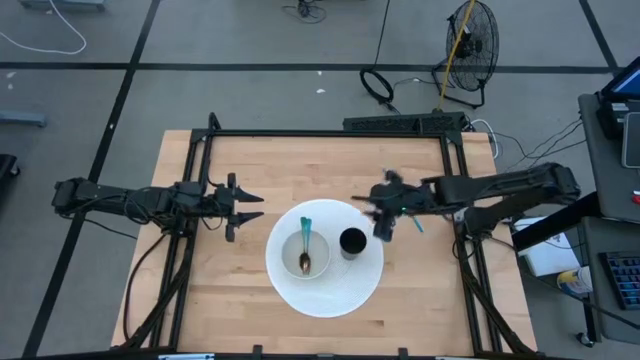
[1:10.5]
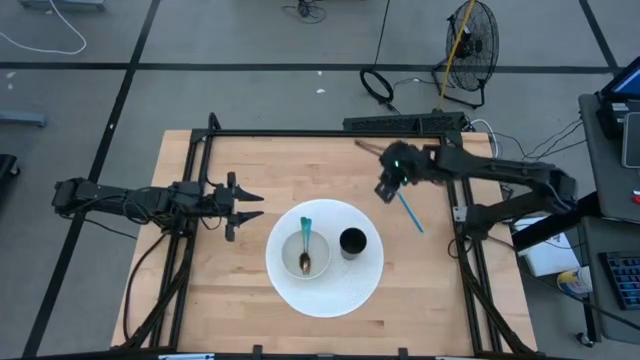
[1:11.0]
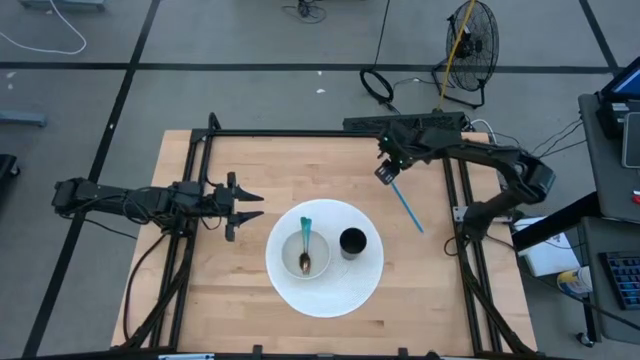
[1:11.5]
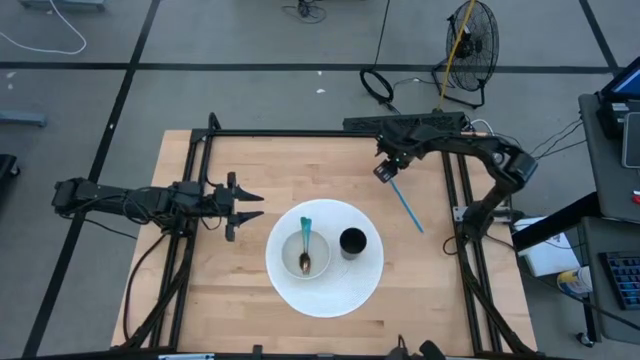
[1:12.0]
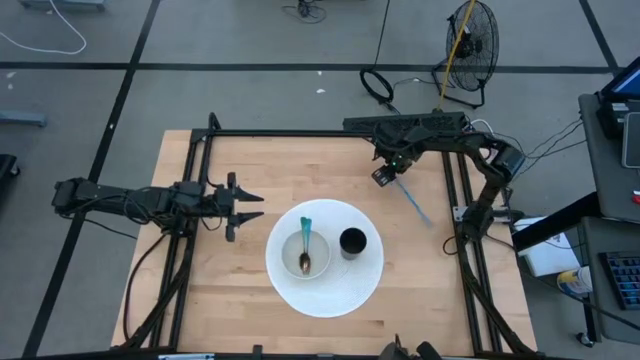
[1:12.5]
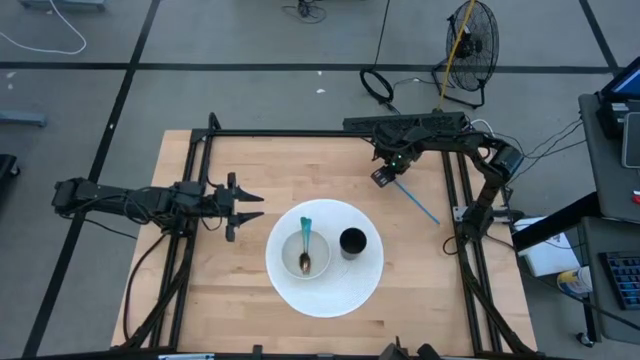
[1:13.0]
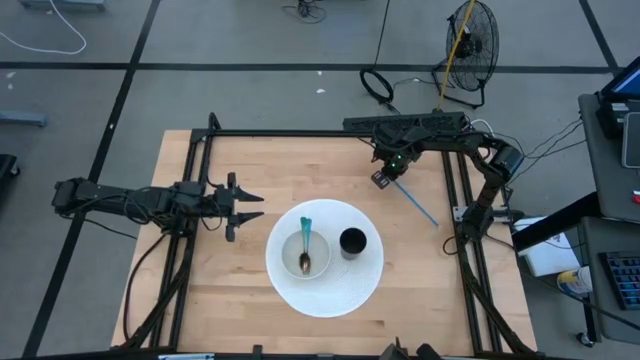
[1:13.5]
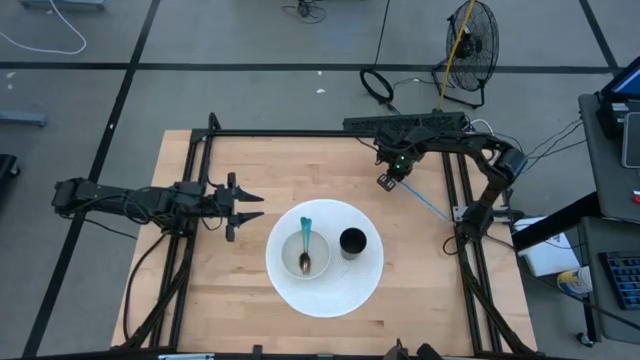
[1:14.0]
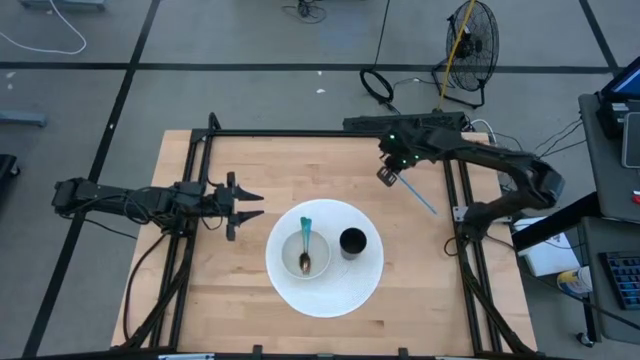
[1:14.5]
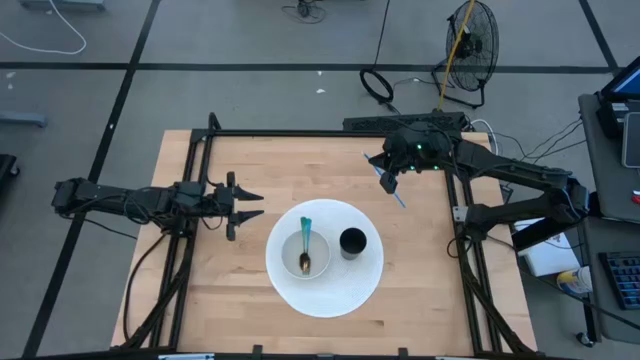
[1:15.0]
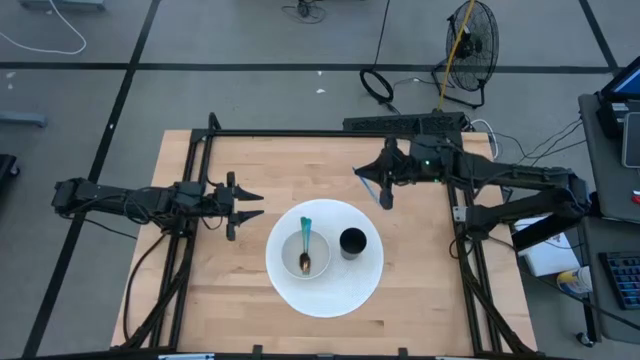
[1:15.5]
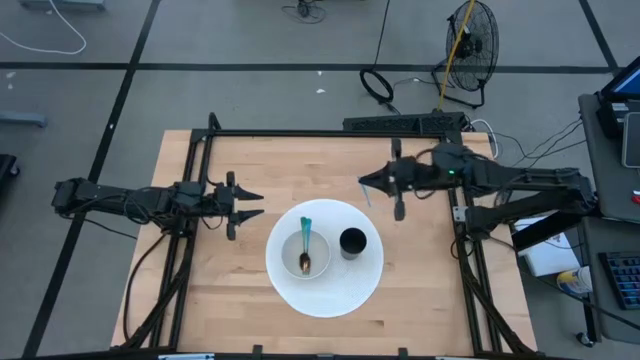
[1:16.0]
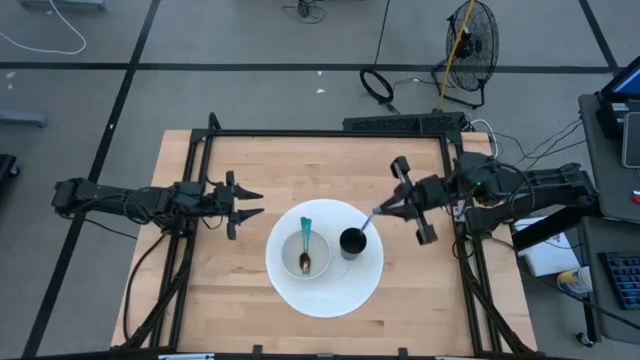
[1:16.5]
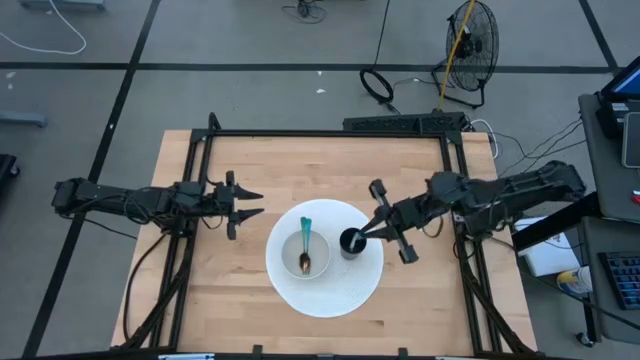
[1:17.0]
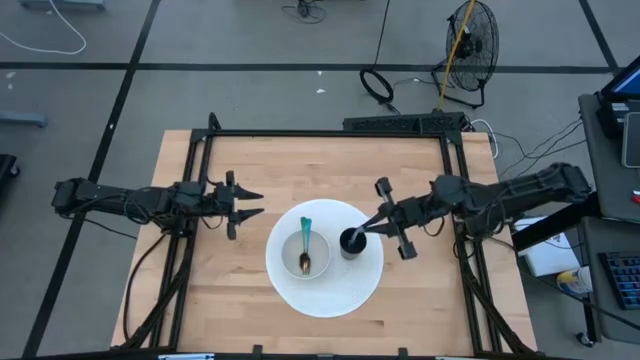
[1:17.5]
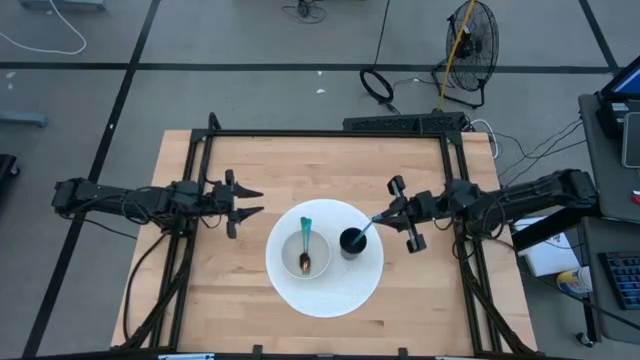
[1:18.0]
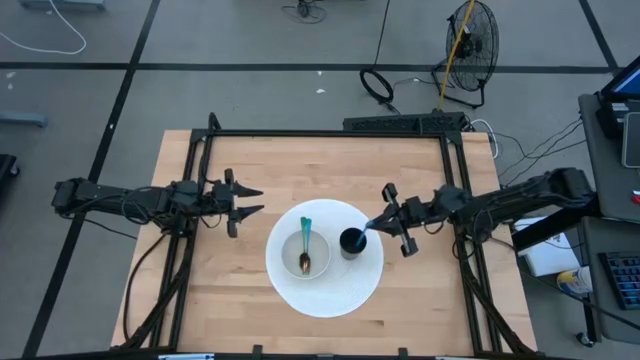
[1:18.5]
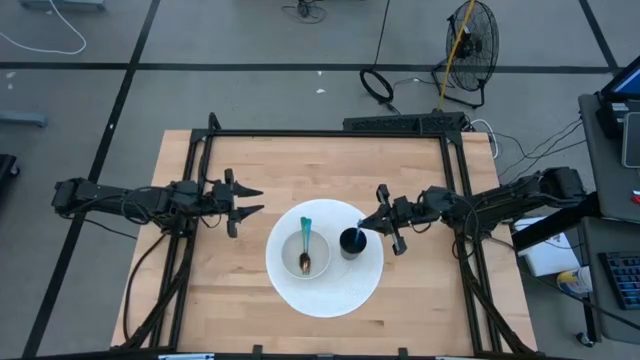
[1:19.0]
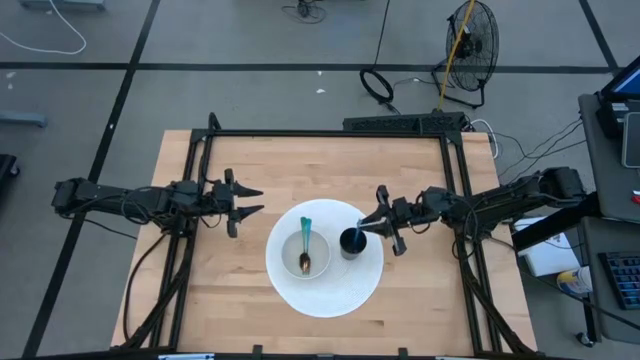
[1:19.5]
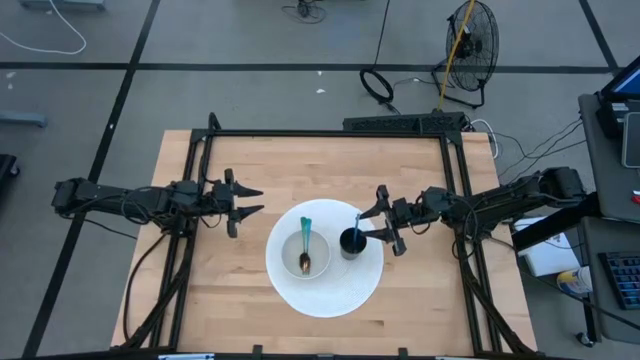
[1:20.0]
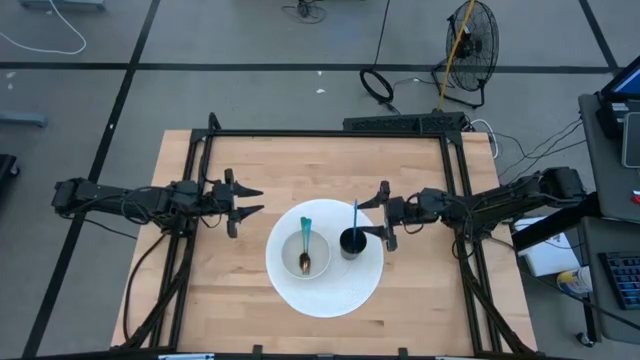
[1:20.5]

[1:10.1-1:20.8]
Task: Pick & Place Utensil
Put the blue straw into the black cup

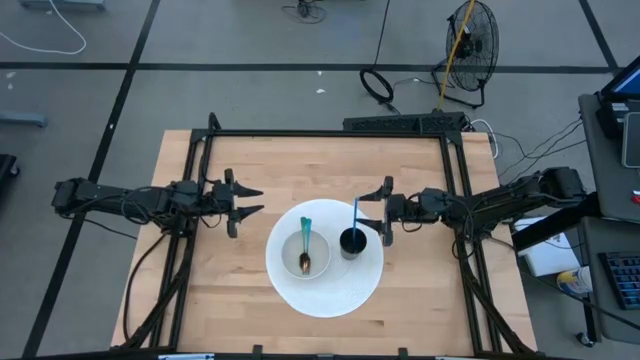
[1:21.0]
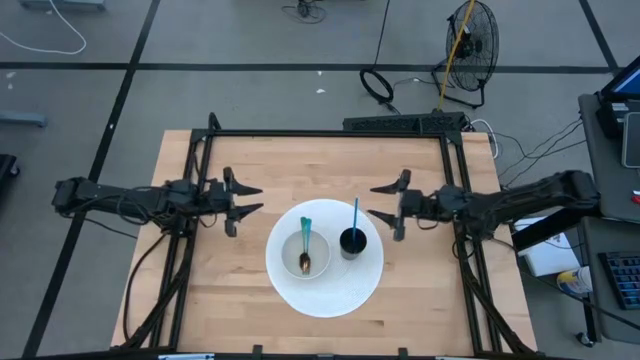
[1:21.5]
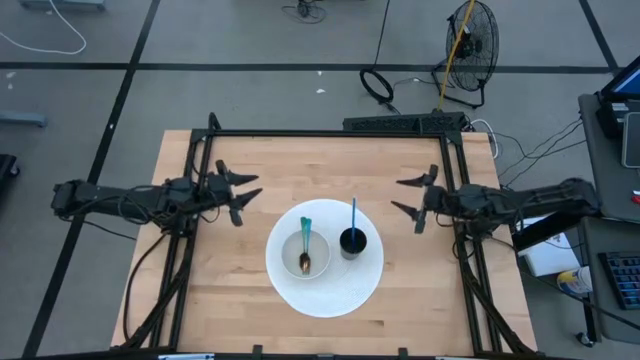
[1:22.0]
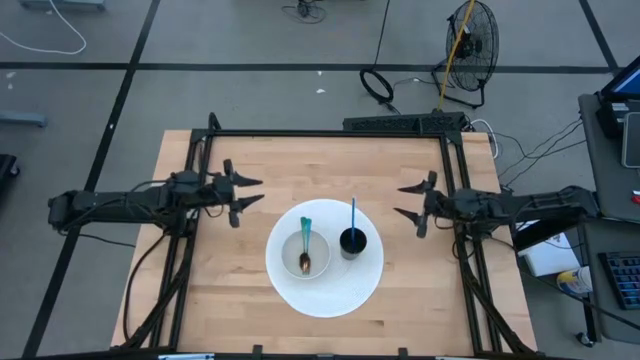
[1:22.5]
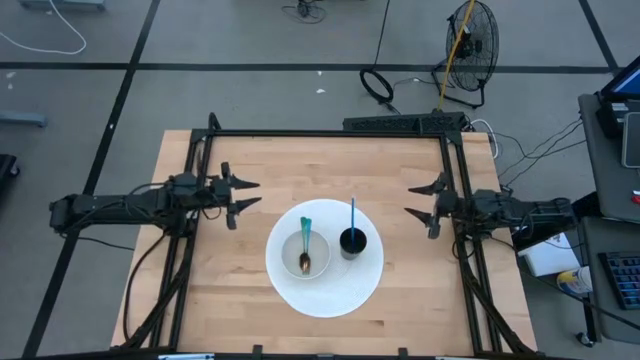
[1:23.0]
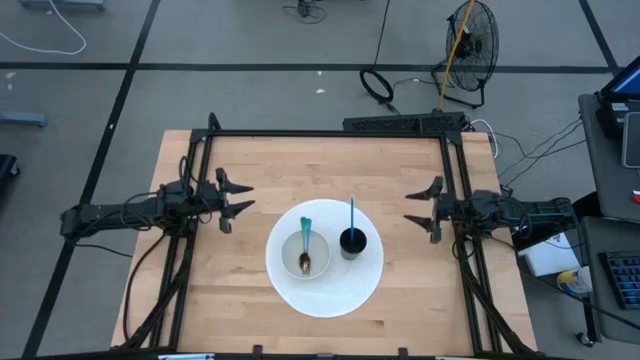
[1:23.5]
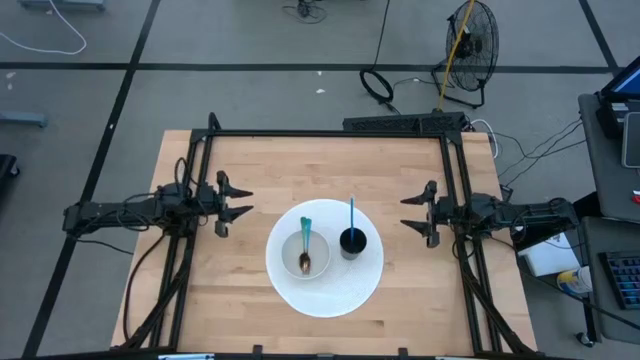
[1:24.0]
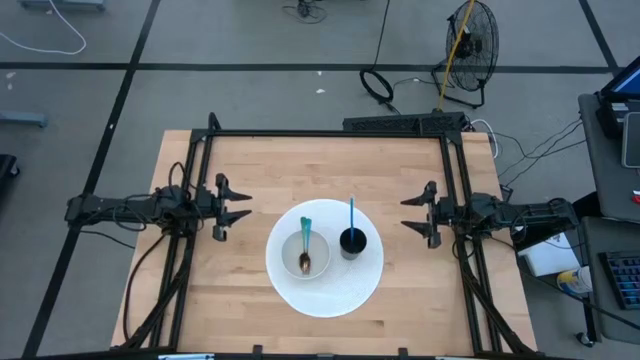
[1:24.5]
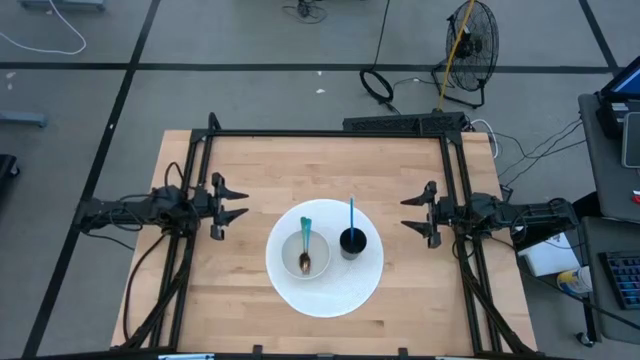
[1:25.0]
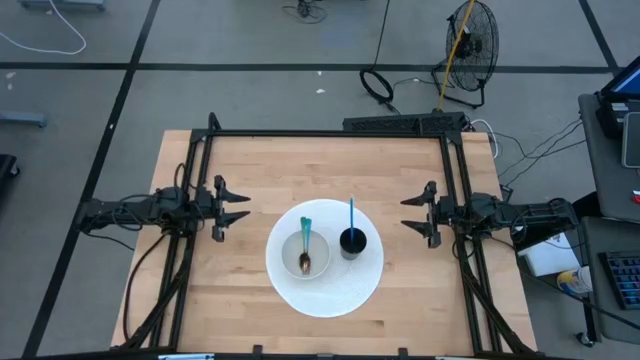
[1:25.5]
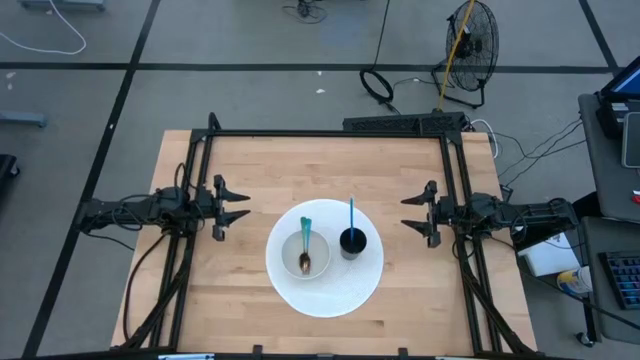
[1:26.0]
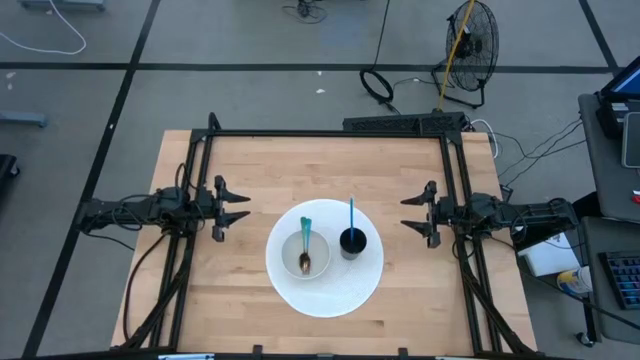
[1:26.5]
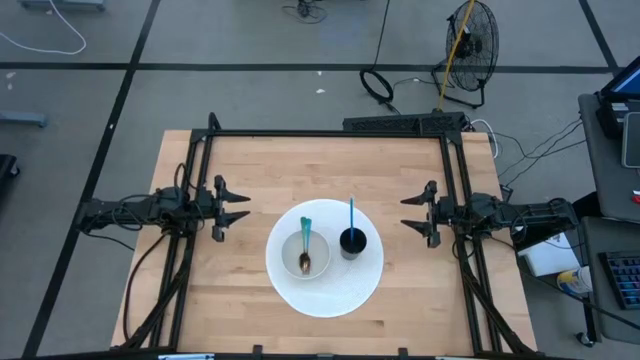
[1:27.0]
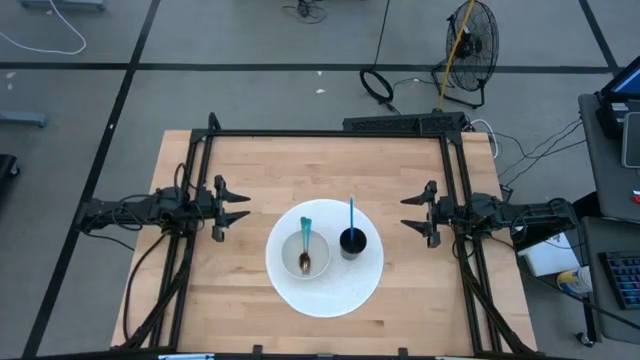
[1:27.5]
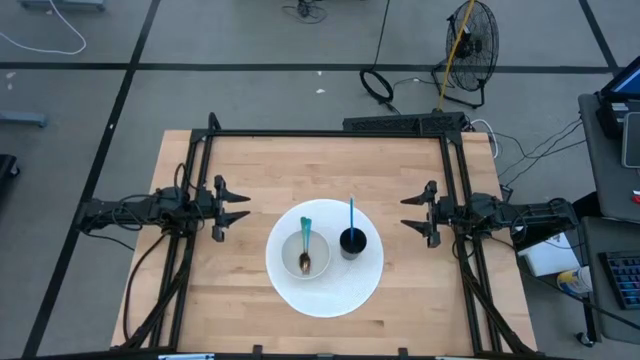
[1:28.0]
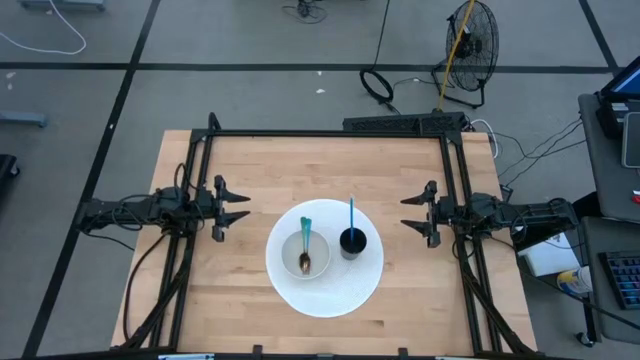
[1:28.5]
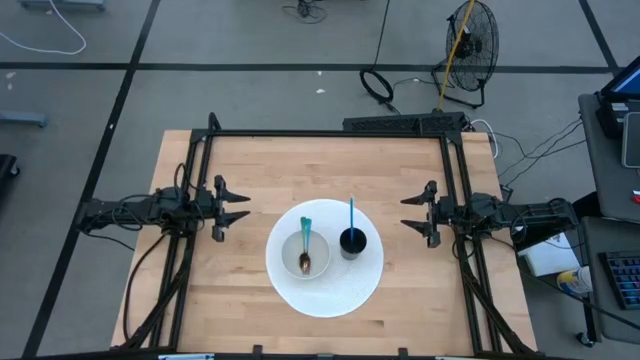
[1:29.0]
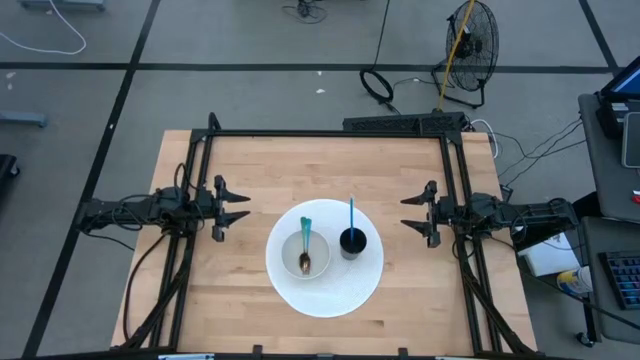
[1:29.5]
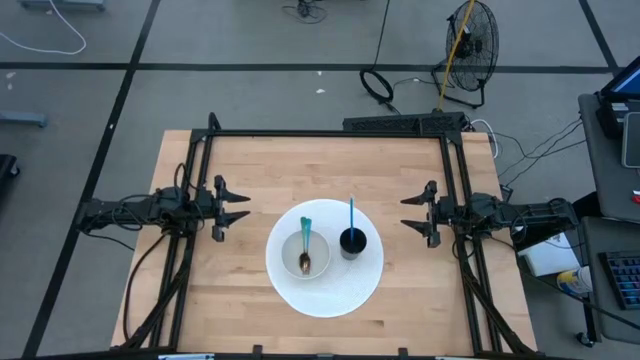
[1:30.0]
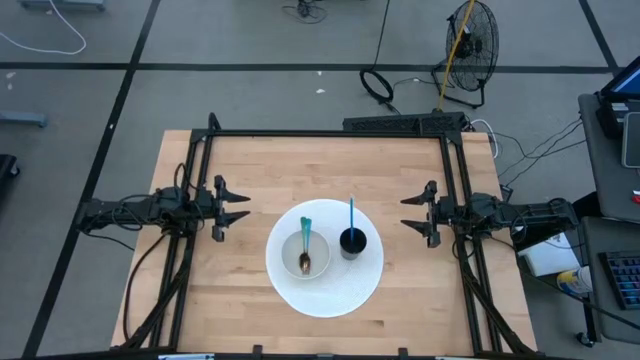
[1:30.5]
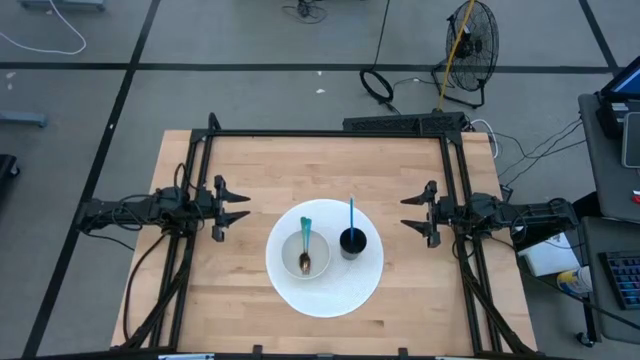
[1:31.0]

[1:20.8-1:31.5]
Return to Home Position
